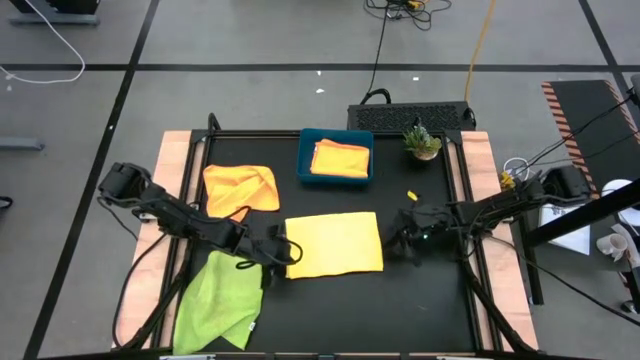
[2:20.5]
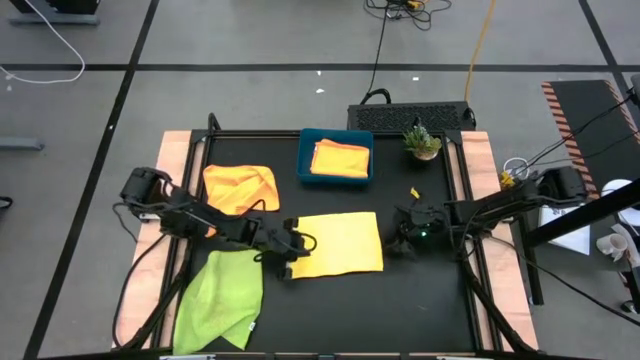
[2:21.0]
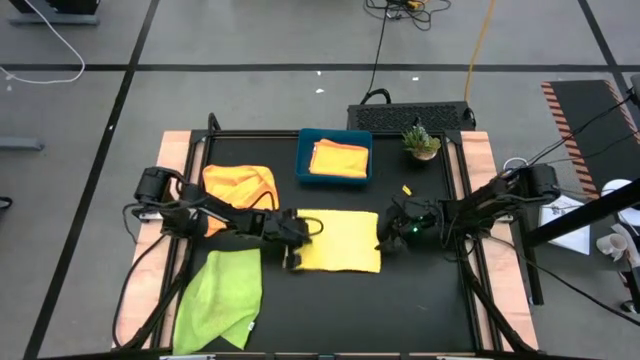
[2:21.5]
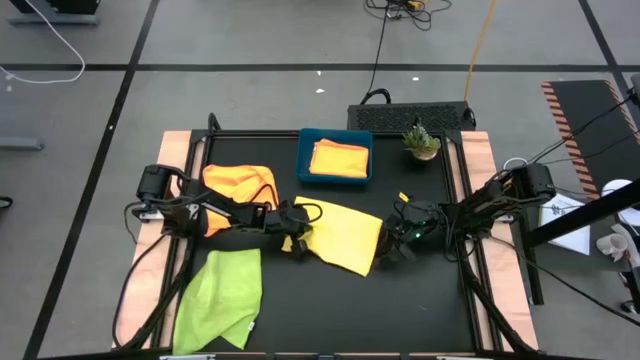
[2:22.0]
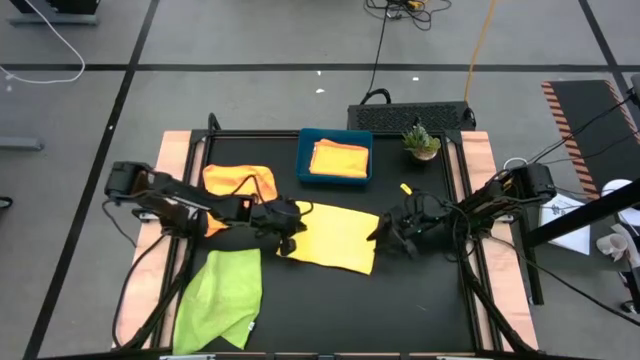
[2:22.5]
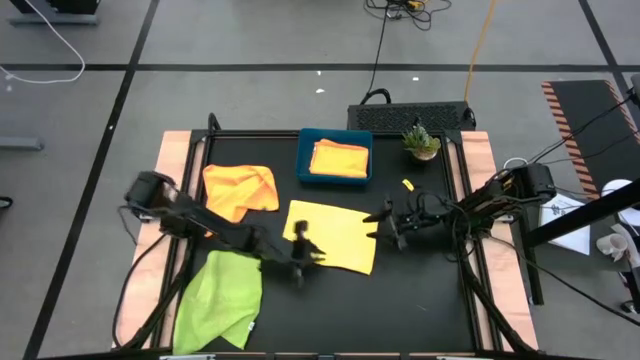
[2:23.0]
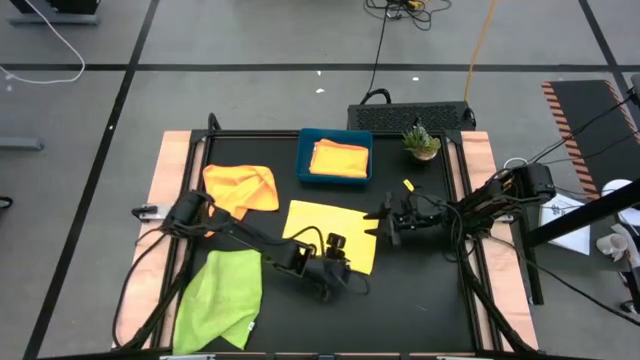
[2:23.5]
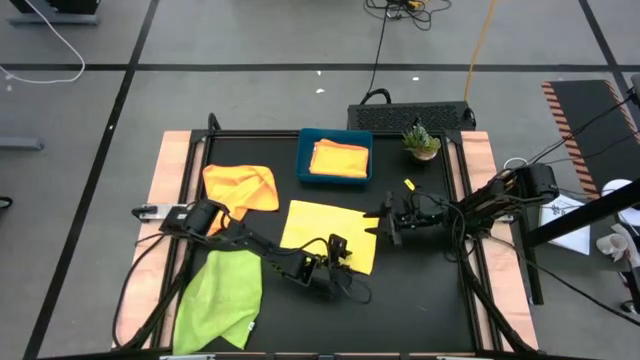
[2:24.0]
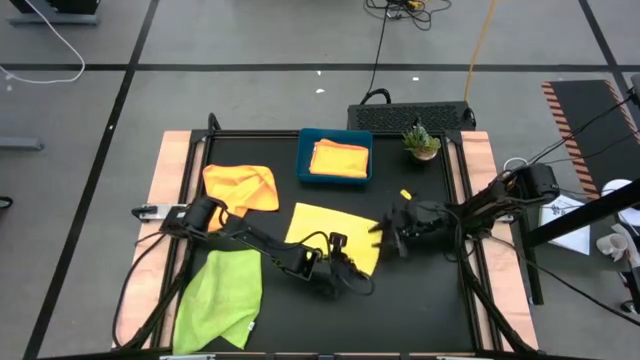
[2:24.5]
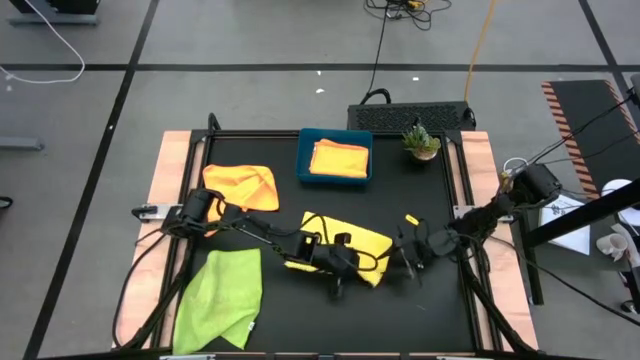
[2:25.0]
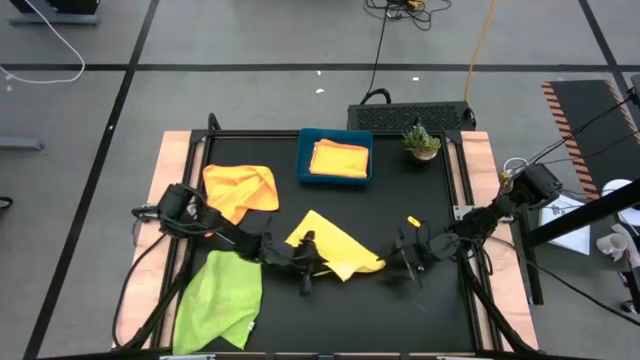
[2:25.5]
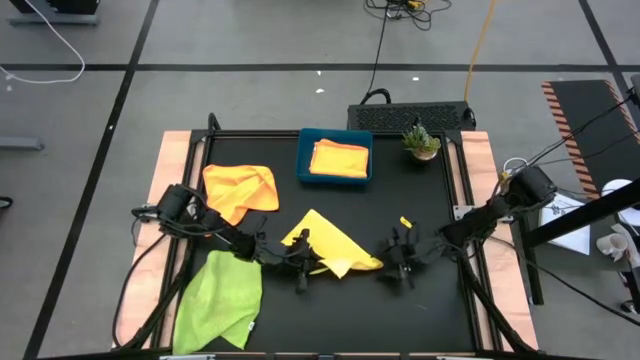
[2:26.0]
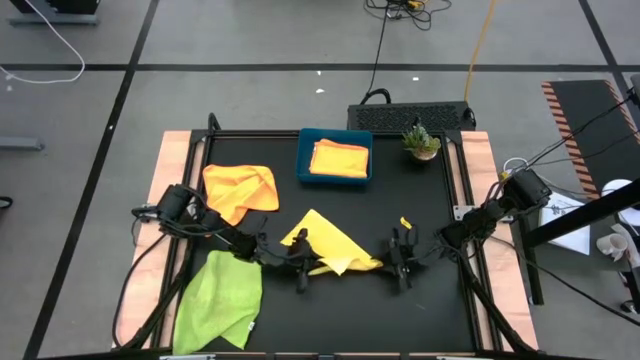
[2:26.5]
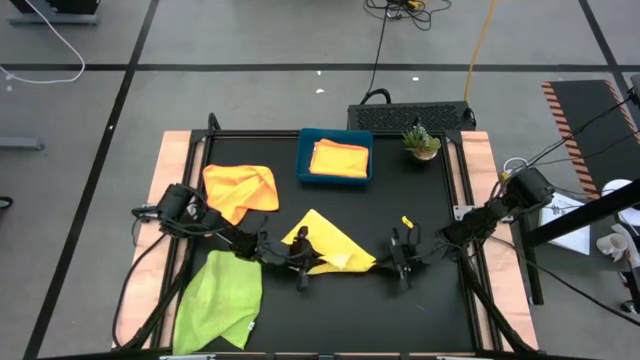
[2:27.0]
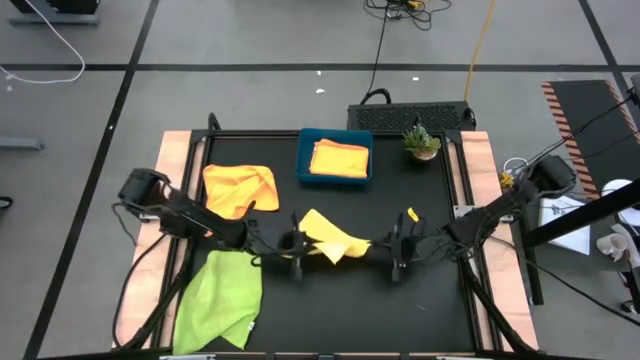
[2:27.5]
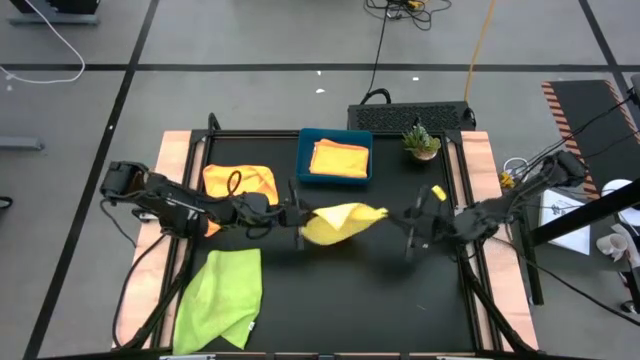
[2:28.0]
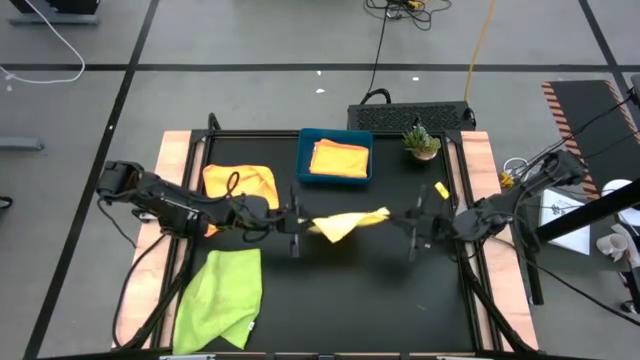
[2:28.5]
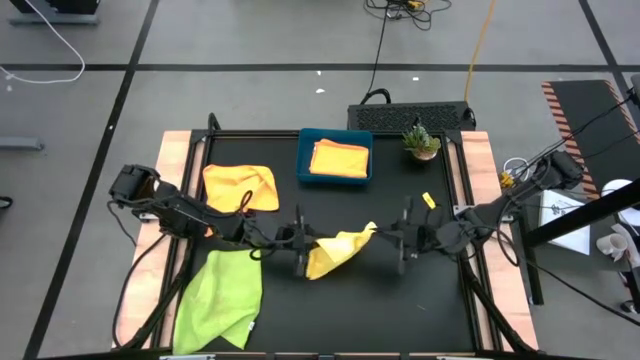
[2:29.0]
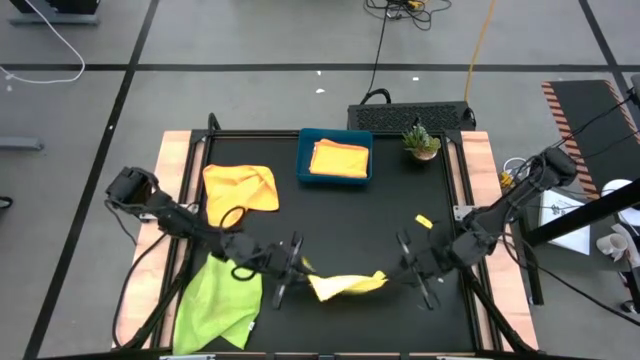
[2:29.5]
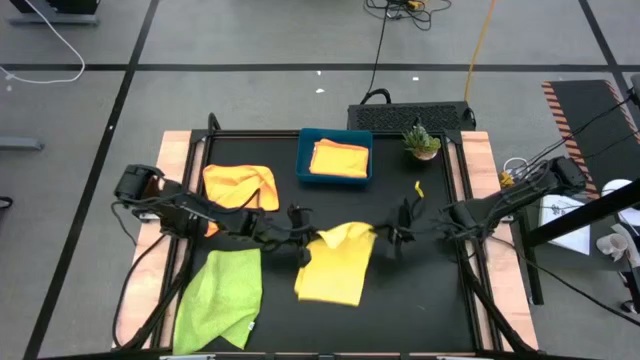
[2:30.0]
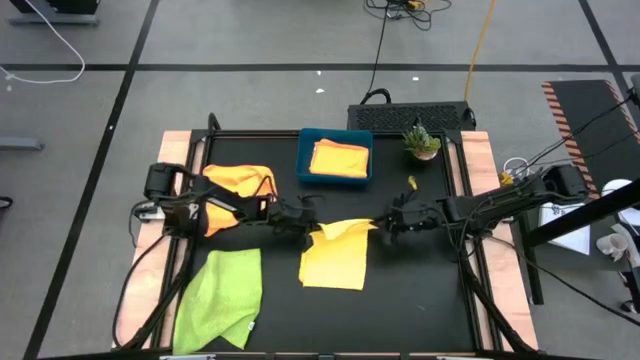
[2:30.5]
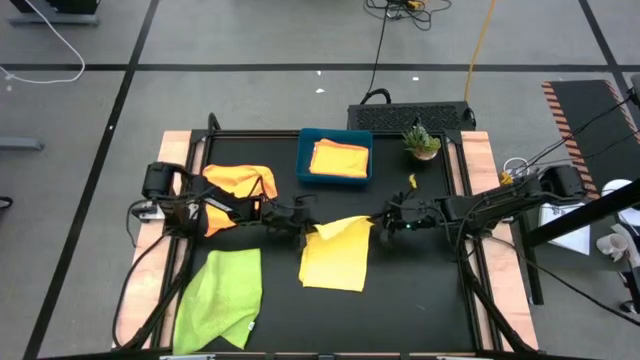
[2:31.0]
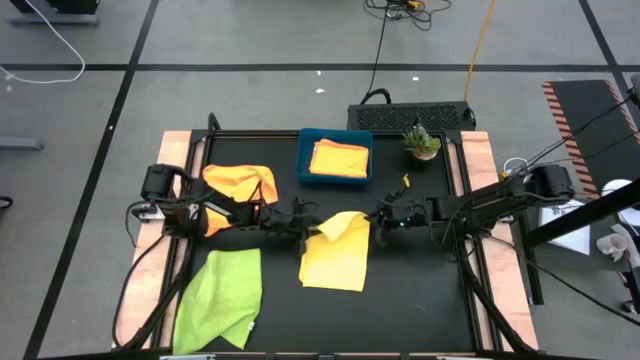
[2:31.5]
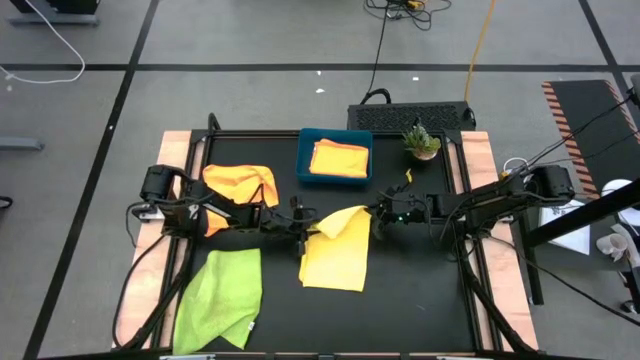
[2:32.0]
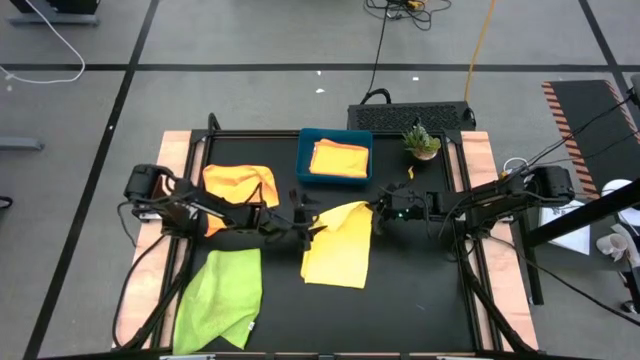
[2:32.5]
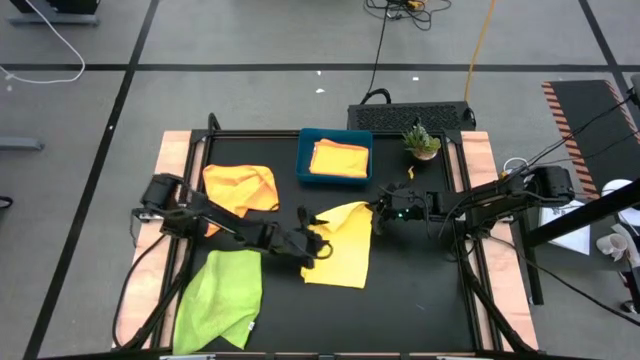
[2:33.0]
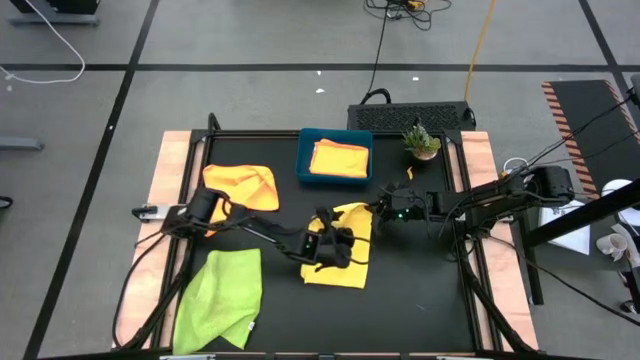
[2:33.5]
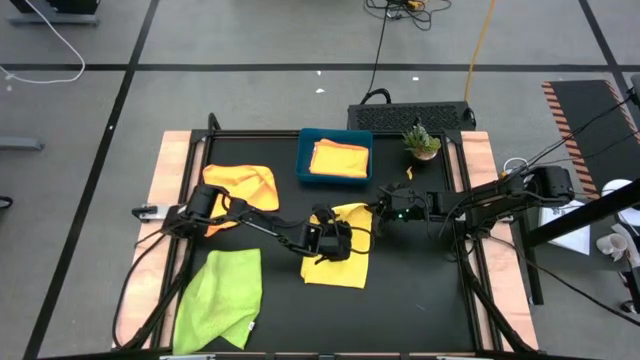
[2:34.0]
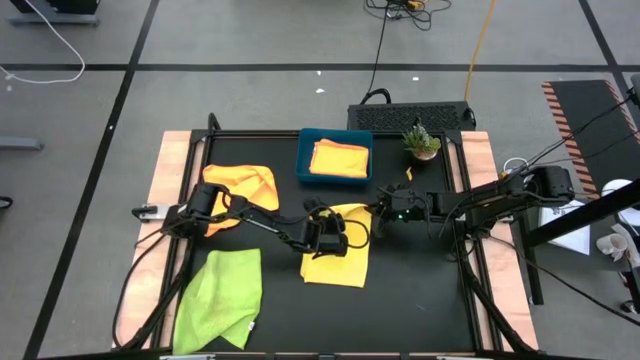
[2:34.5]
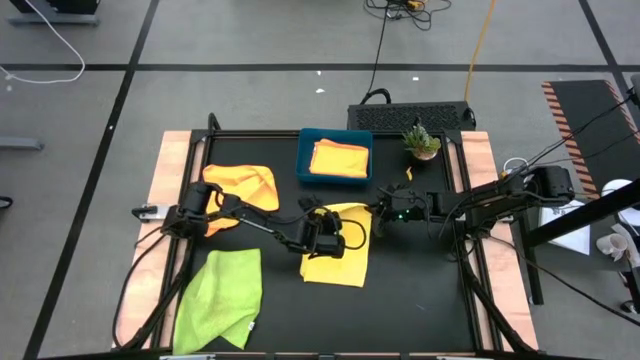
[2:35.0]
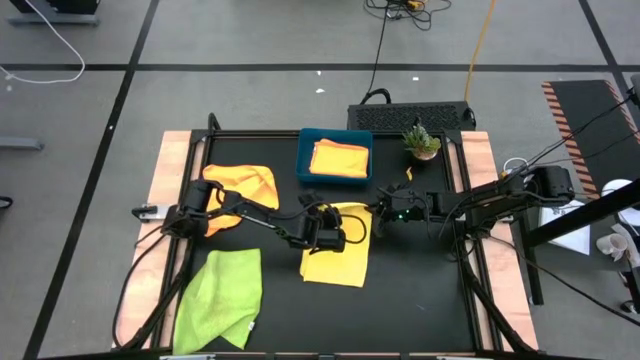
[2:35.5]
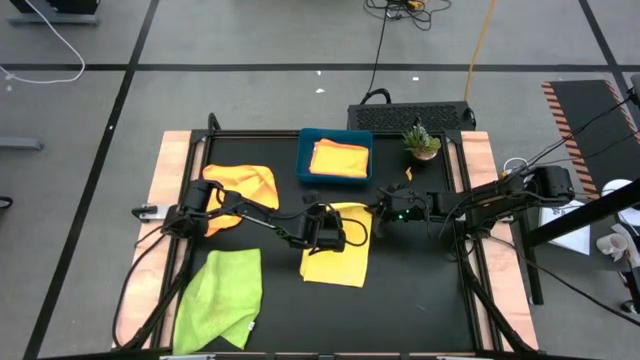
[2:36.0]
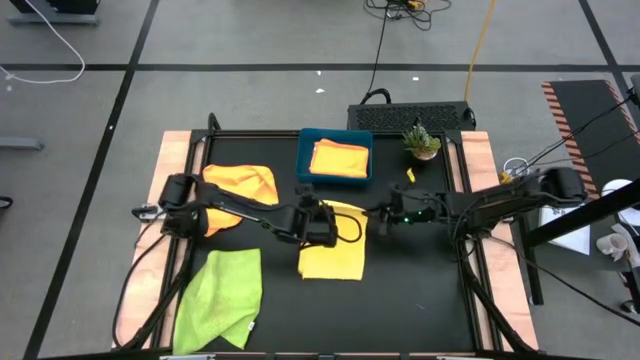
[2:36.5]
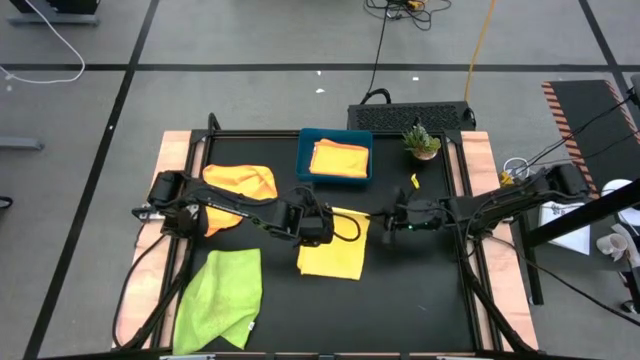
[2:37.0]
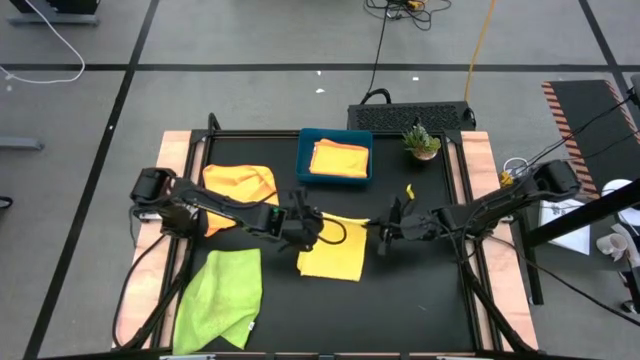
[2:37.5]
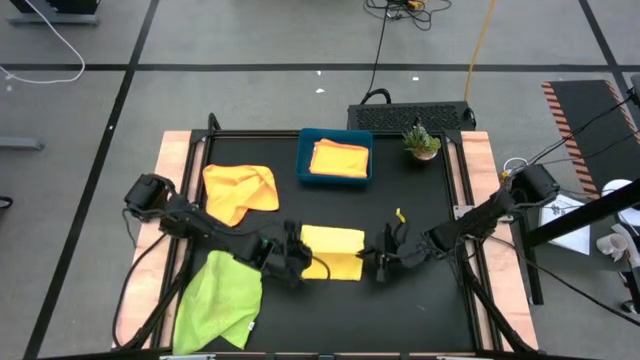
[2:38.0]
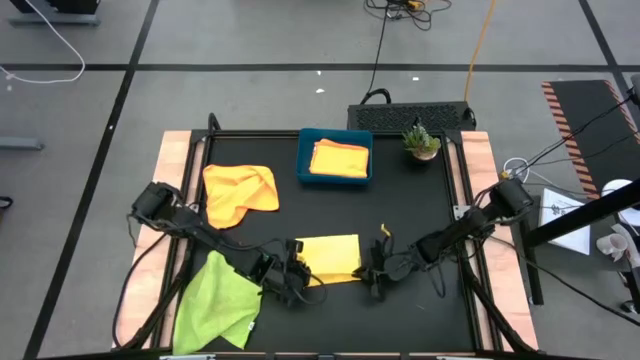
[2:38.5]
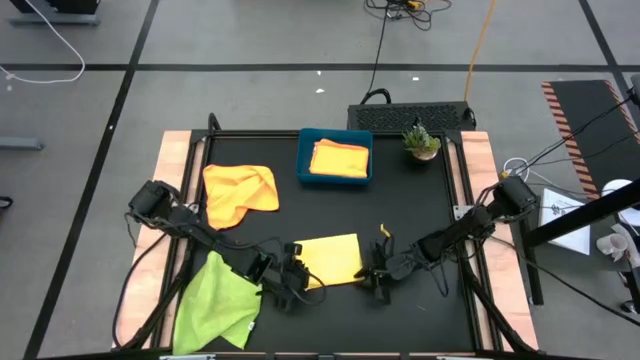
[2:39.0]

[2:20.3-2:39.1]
Task: Fold microfiber towels
Fold the yellow microfiber cloth

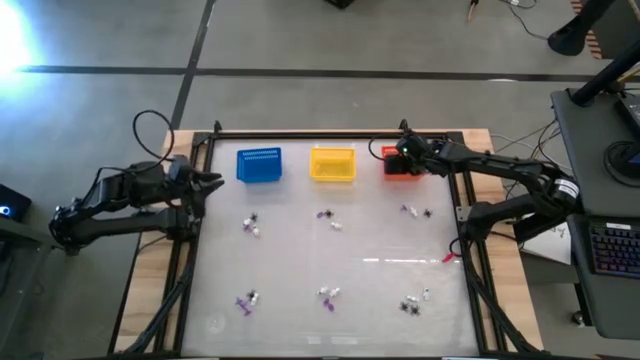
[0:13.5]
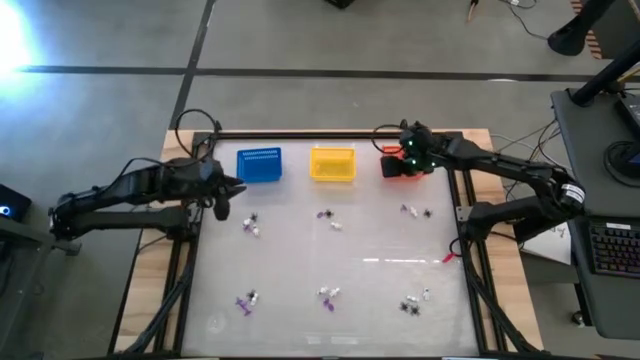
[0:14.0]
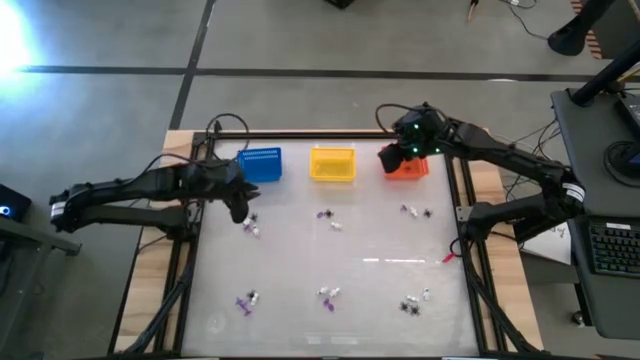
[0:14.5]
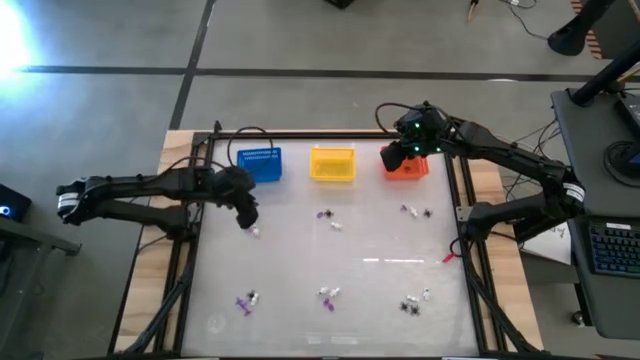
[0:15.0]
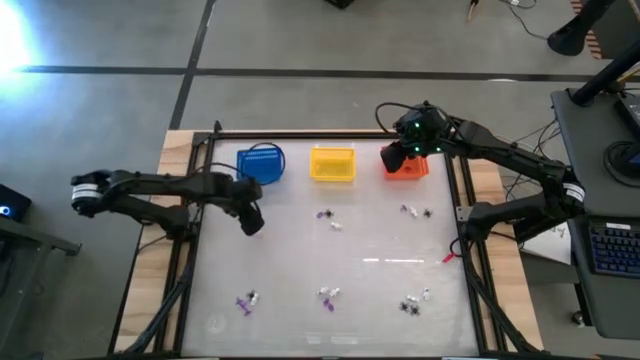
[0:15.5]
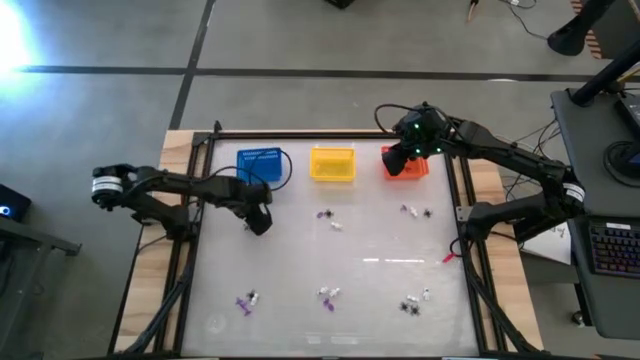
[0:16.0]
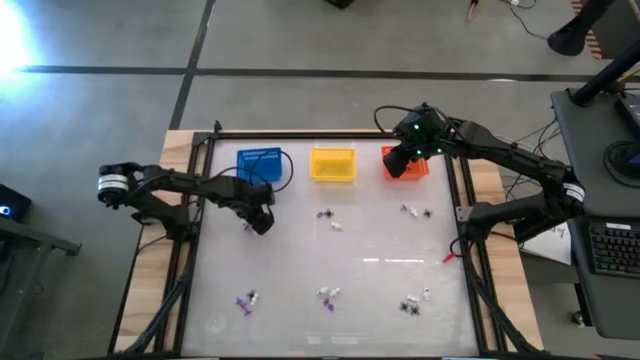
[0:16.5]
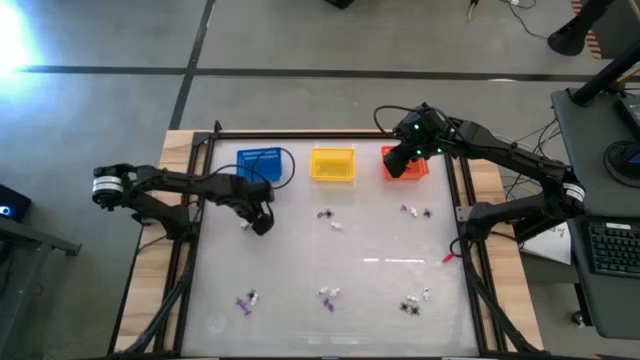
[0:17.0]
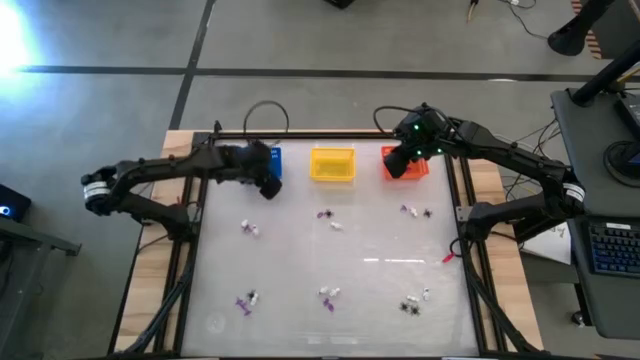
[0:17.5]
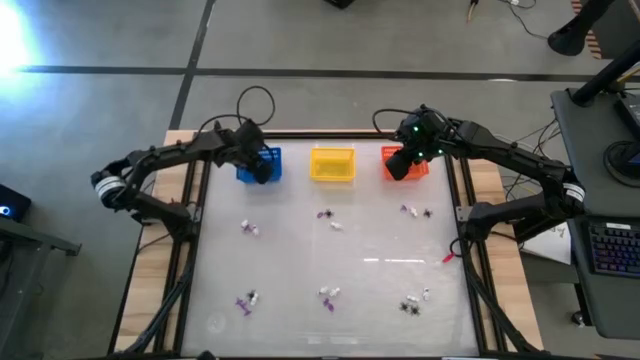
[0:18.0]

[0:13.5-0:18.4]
Task: Sort Halloween decoration
Put the black spider toy into the blue bin
